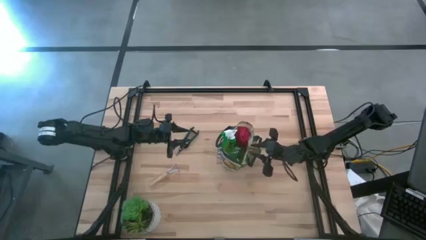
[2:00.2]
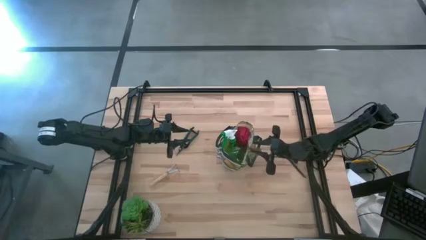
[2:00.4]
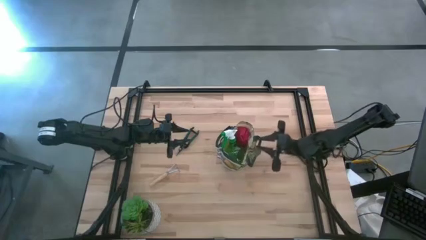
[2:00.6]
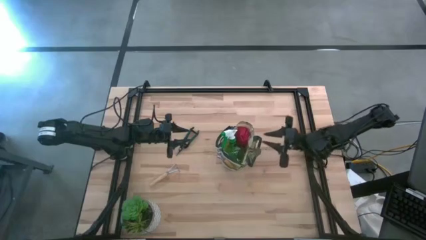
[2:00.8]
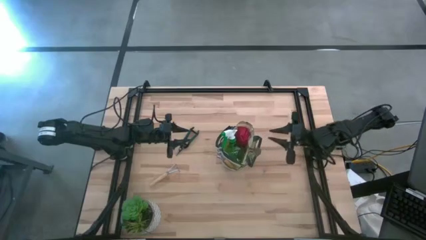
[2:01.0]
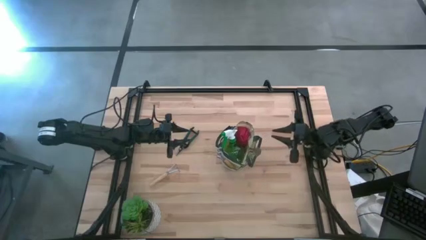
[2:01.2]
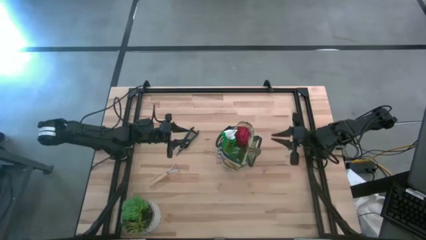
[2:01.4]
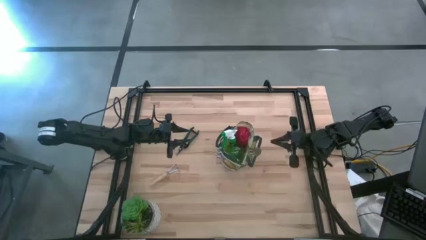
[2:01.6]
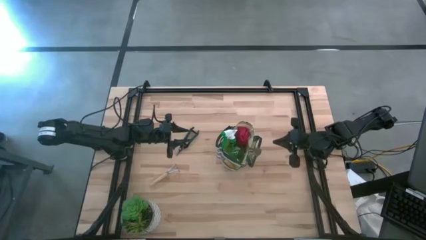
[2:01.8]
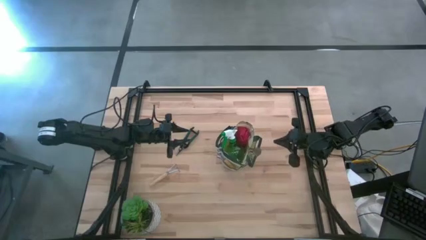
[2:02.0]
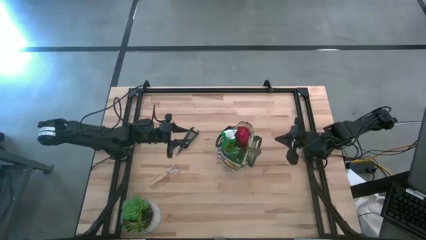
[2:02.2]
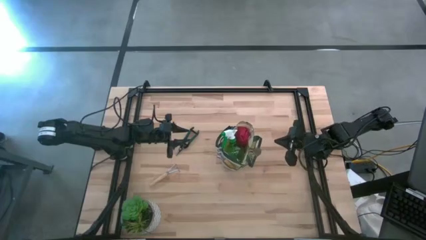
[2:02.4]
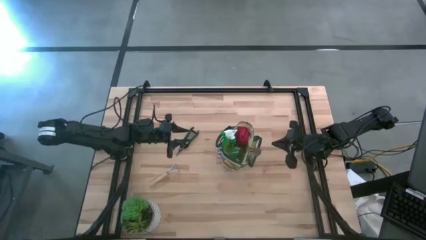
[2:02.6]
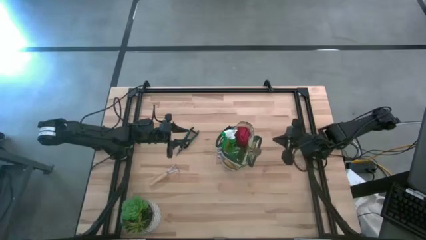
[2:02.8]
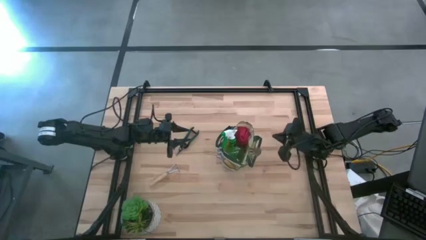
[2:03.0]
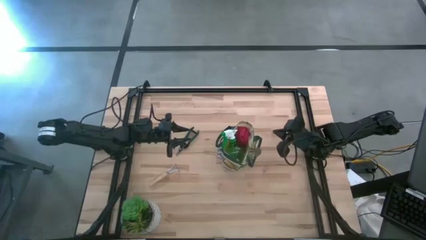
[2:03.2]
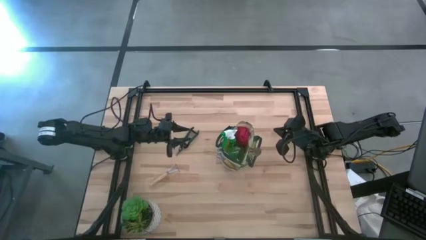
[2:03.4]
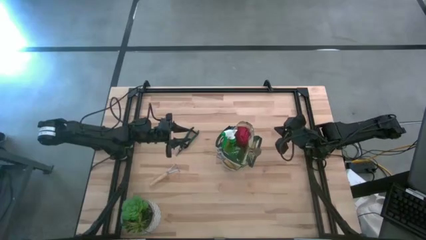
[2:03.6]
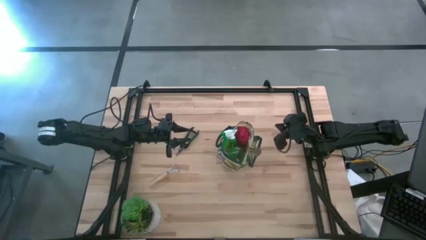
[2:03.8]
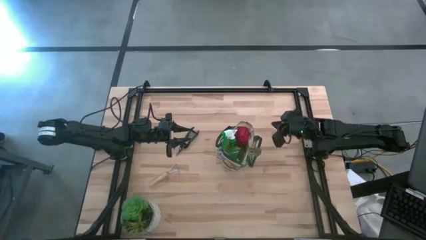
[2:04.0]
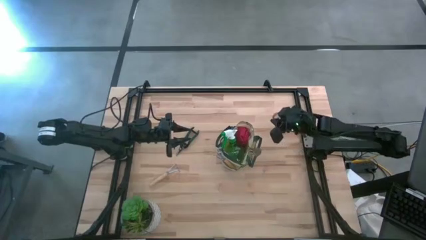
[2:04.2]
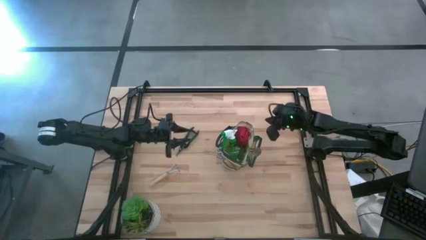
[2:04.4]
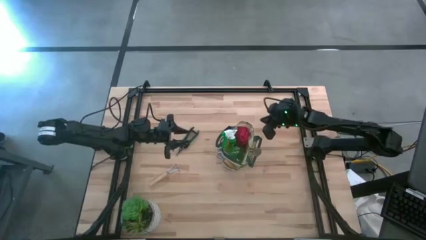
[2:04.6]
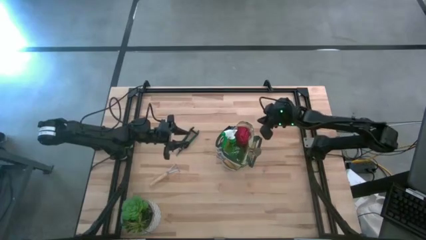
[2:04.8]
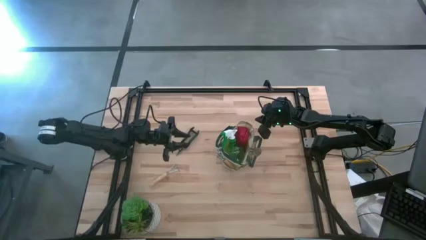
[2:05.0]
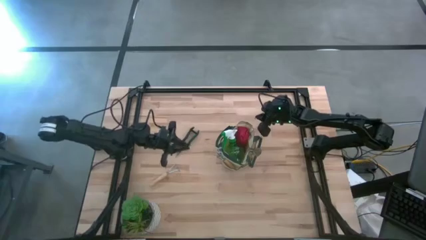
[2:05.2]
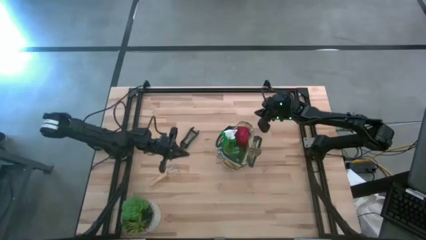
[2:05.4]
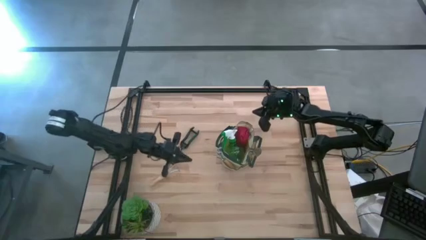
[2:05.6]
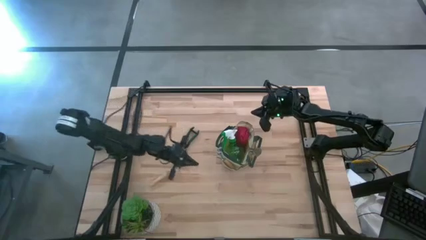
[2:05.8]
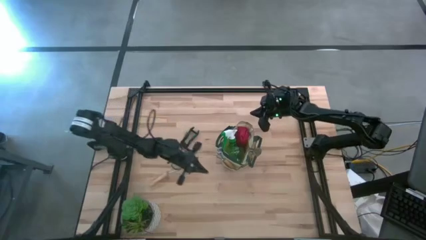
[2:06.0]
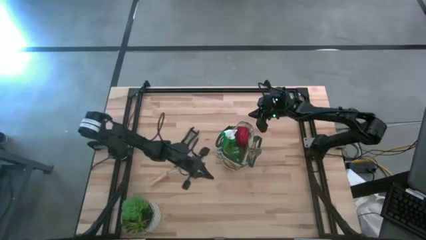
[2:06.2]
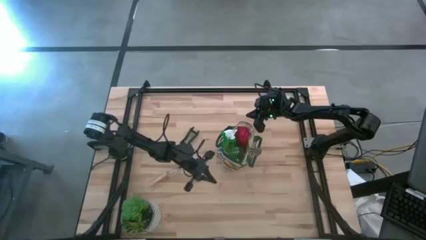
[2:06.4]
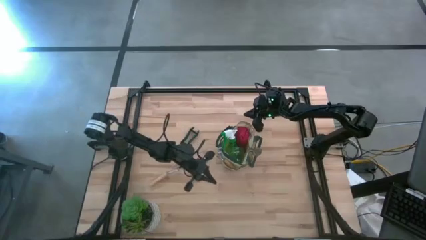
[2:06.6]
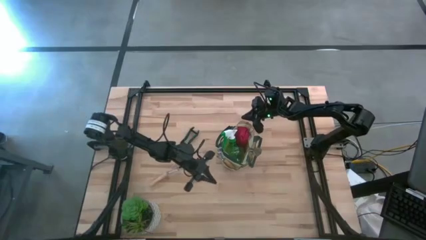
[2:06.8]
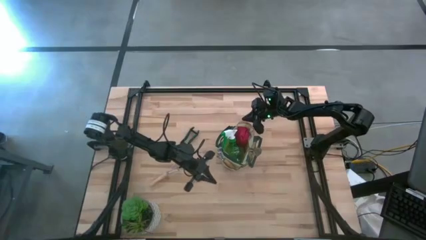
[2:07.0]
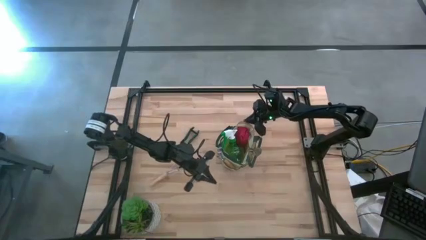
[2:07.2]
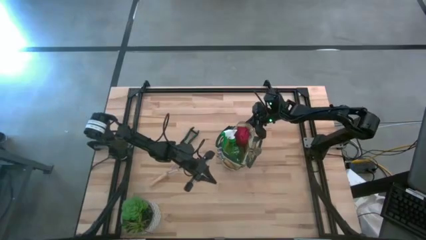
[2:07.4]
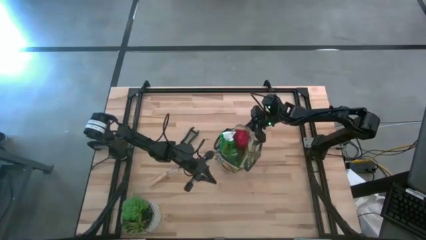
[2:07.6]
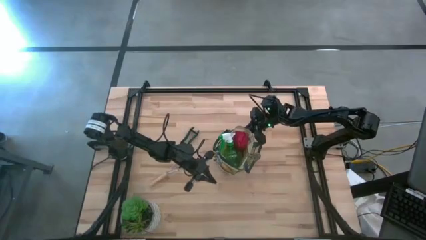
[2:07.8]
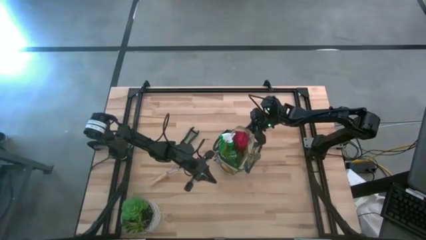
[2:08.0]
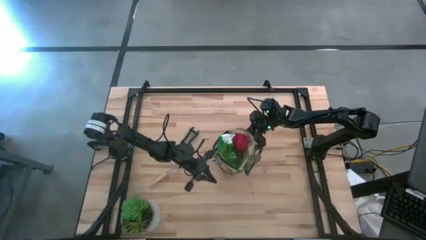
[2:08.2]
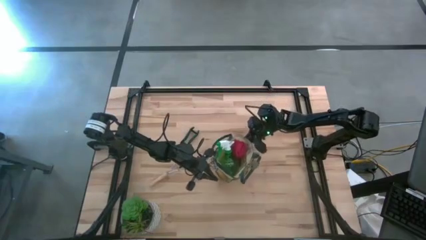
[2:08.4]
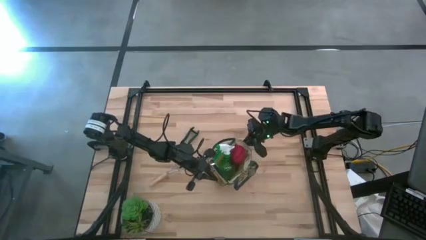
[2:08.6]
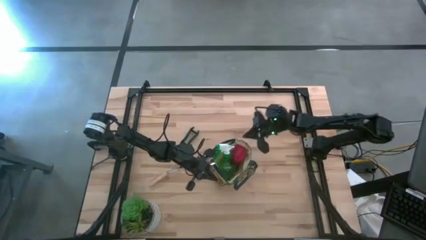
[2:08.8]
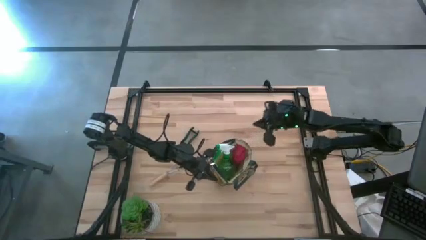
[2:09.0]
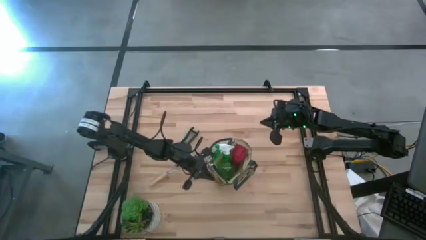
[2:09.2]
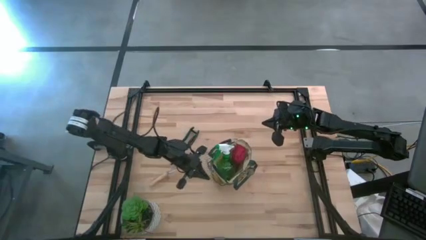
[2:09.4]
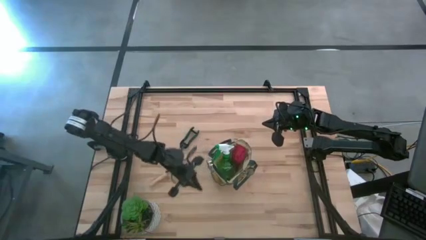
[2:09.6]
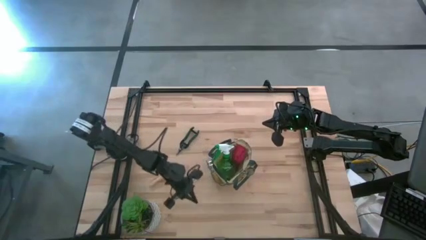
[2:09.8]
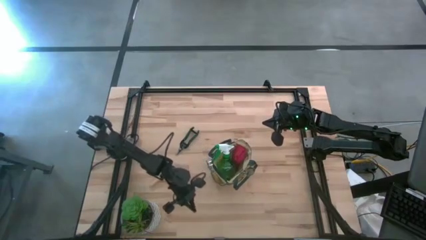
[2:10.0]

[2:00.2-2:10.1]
Task: Pick & Place Garden tools in Gardening bag
Adjust the gardening bag

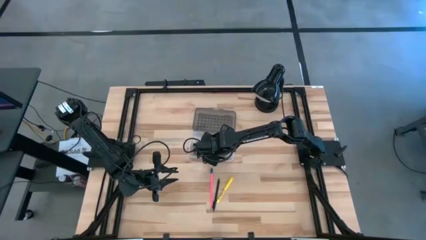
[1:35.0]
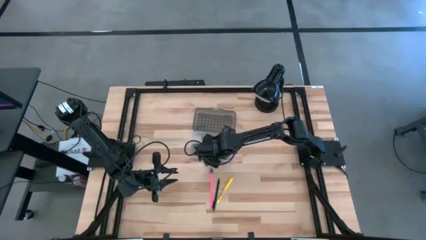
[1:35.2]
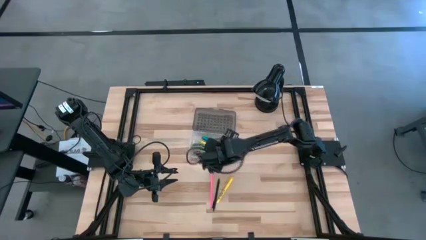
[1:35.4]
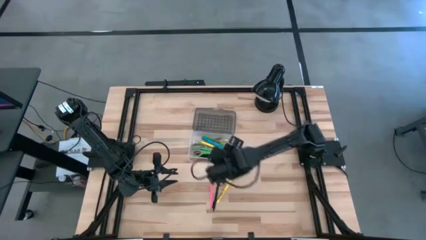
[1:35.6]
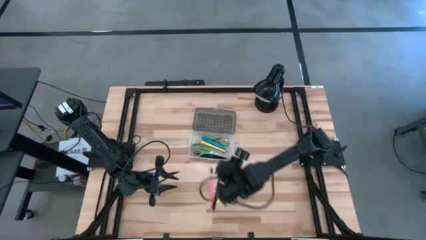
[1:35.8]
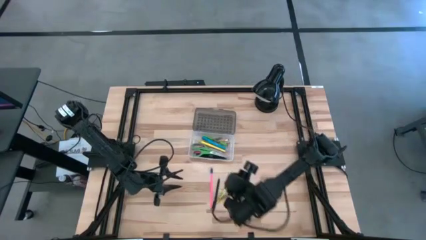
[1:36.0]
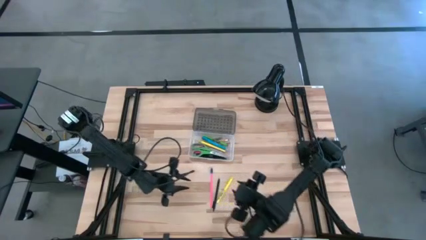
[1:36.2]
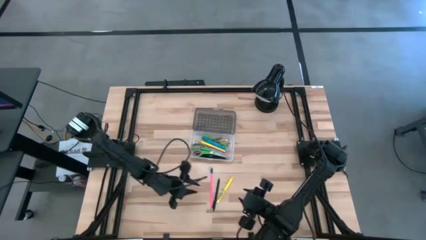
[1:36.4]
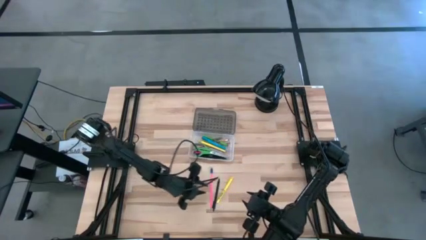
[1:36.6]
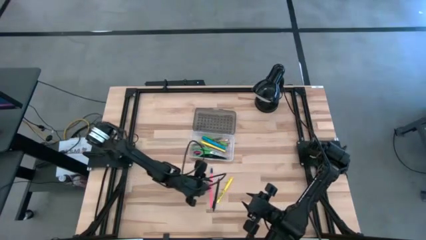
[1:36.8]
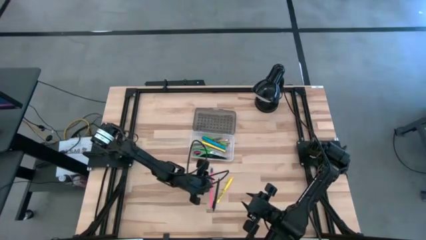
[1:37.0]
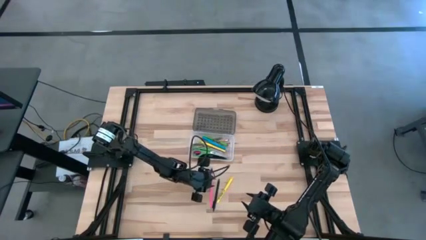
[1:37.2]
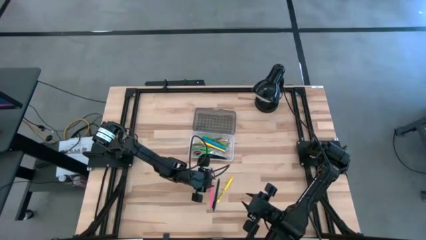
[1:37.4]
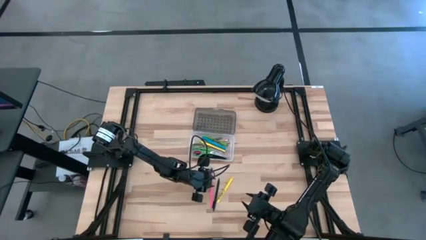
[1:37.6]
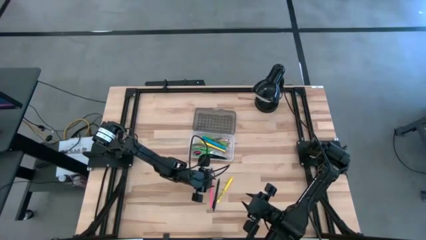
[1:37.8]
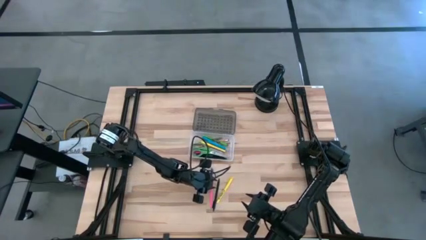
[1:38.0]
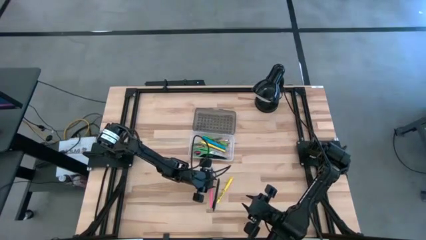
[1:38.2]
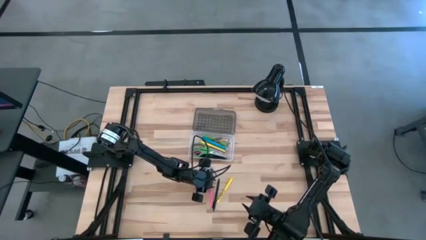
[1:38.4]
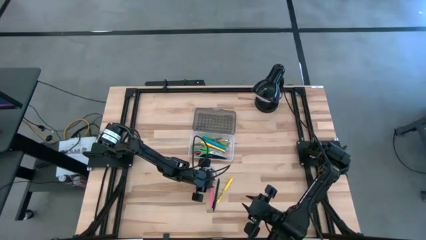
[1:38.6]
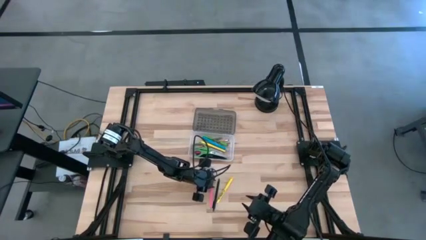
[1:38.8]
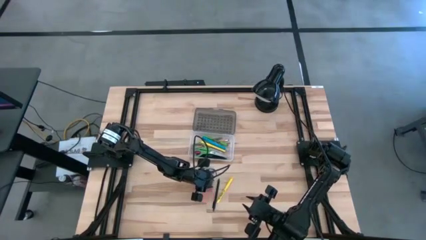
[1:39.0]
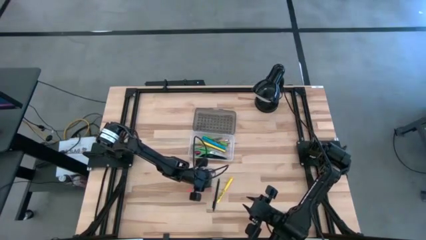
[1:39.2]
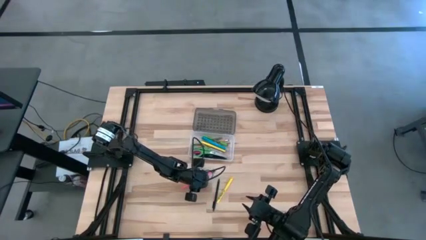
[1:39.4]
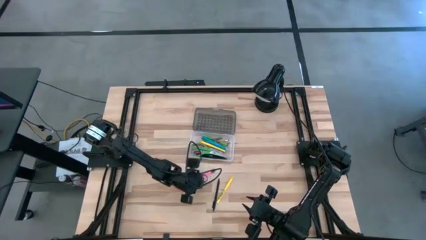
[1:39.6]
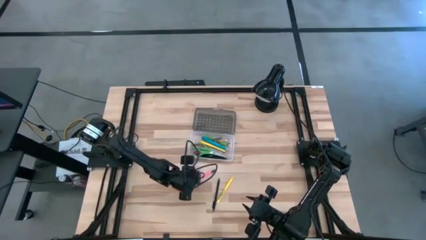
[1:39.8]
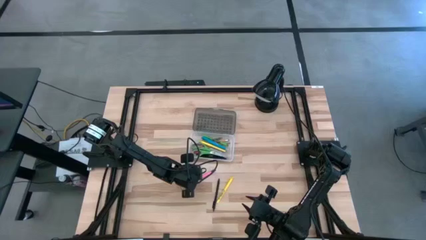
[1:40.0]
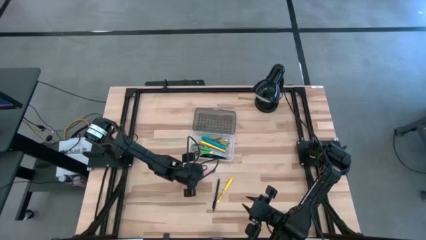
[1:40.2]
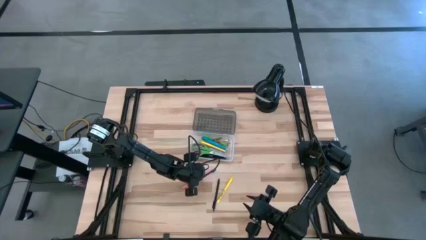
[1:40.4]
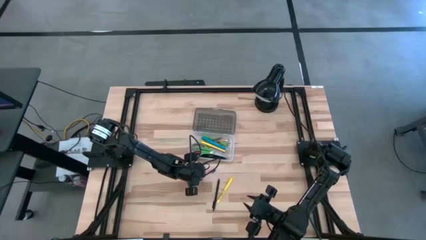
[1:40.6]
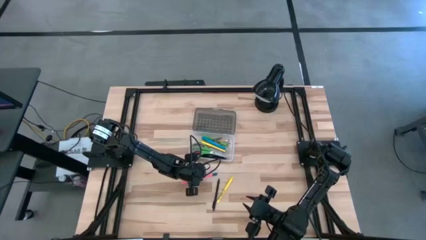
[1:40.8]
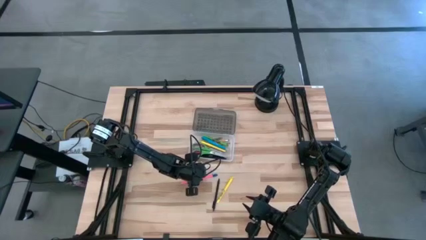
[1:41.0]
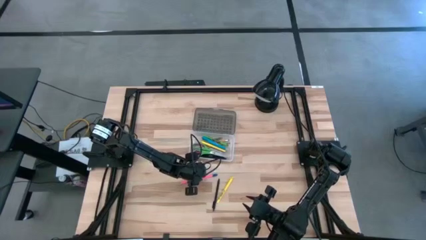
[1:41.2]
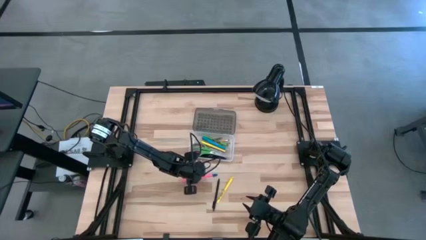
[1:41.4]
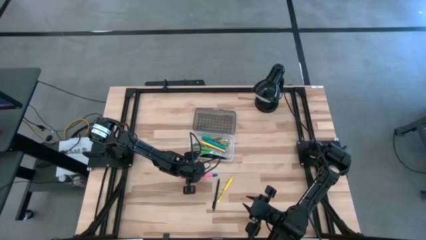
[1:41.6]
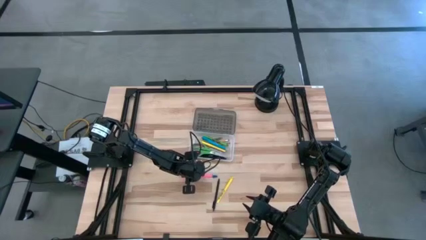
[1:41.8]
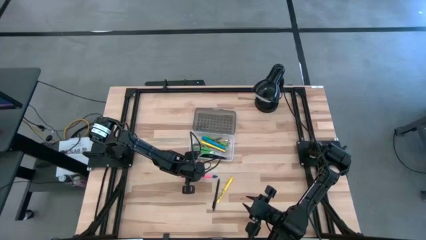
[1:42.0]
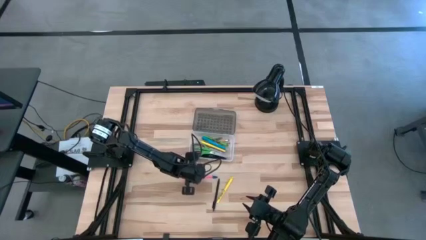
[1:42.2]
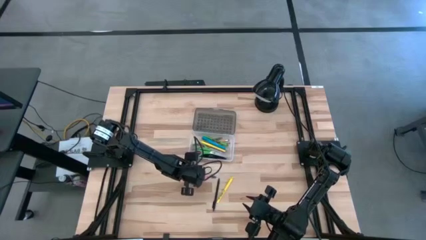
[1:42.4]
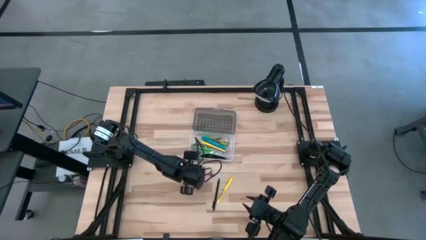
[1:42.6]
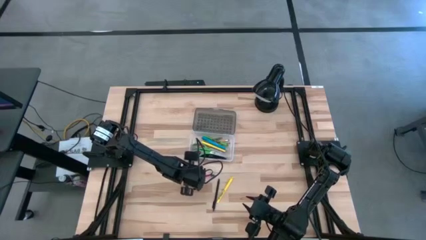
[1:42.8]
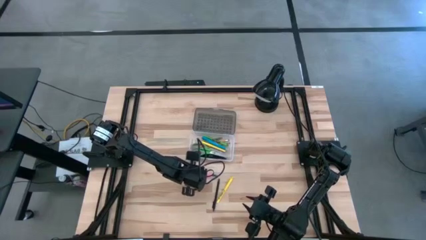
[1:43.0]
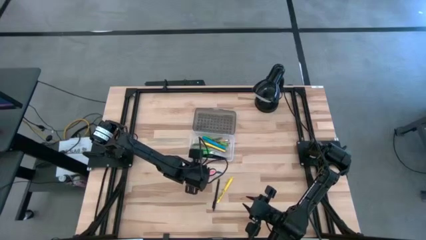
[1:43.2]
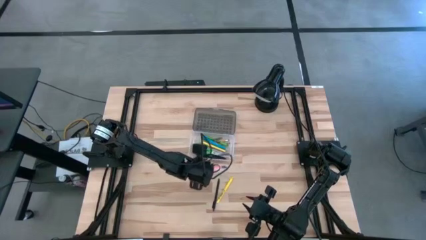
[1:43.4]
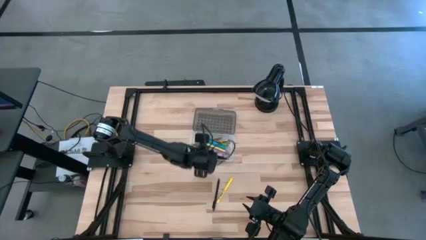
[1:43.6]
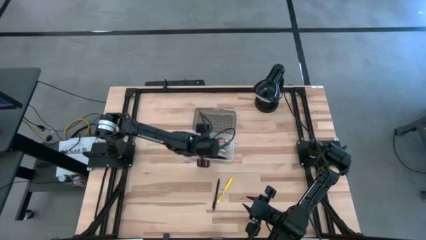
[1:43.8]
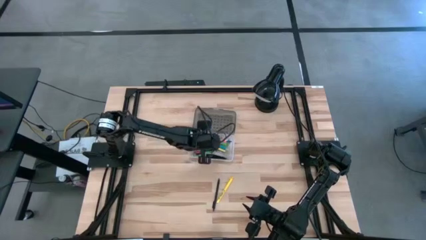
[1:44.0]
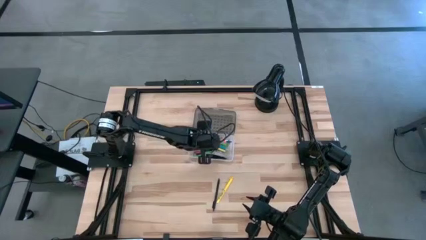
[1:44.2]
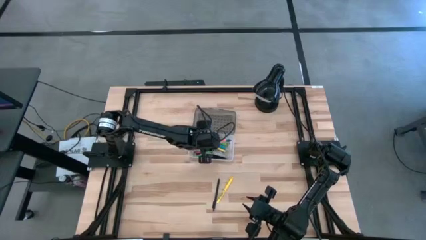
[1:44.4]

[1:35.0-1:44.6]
Task: Pick & place school supplies into a supply box
Put the pink pencil into the transparent supply box
